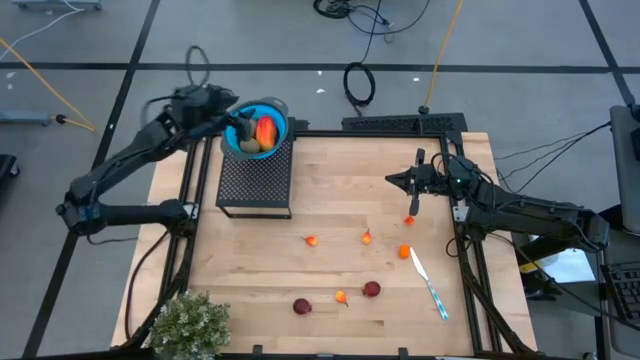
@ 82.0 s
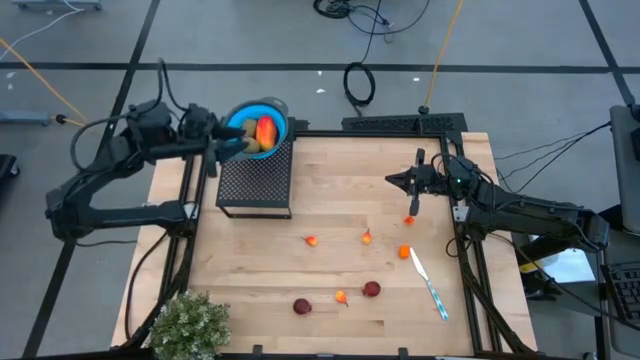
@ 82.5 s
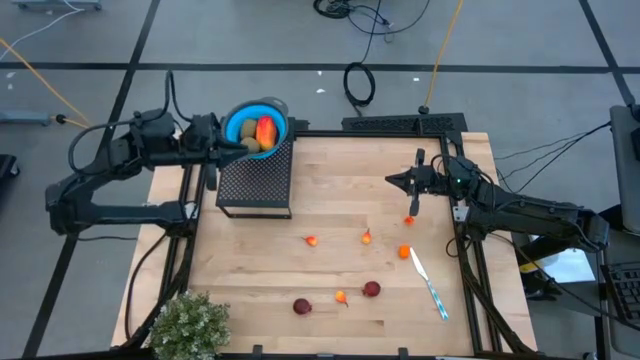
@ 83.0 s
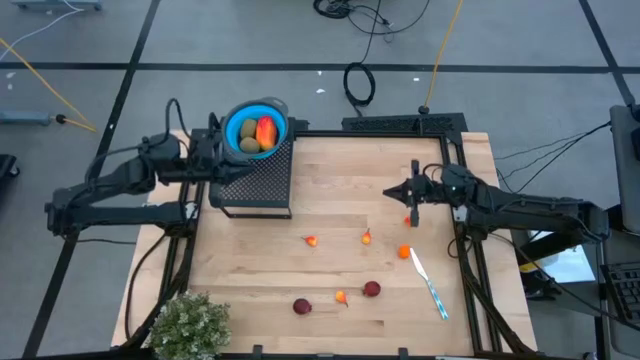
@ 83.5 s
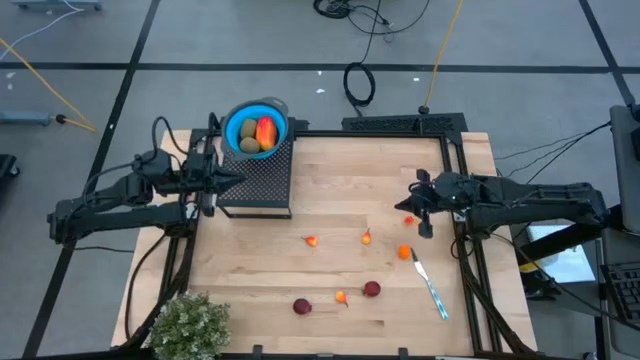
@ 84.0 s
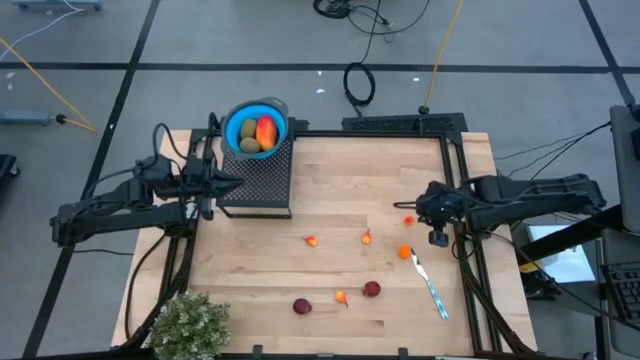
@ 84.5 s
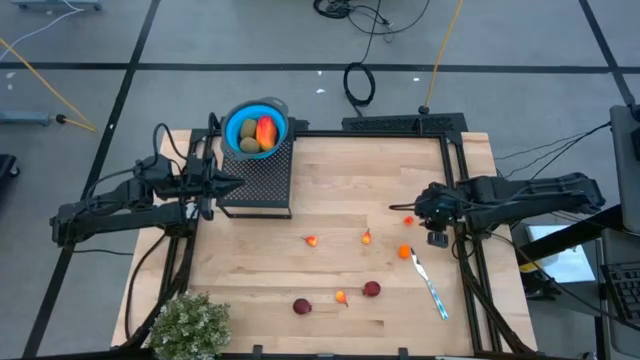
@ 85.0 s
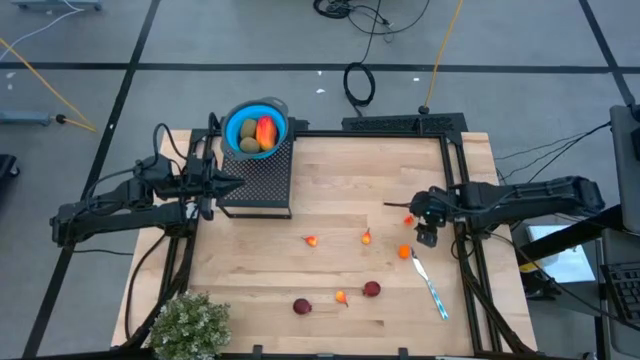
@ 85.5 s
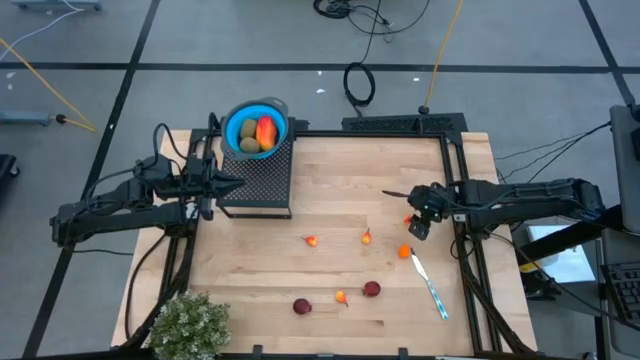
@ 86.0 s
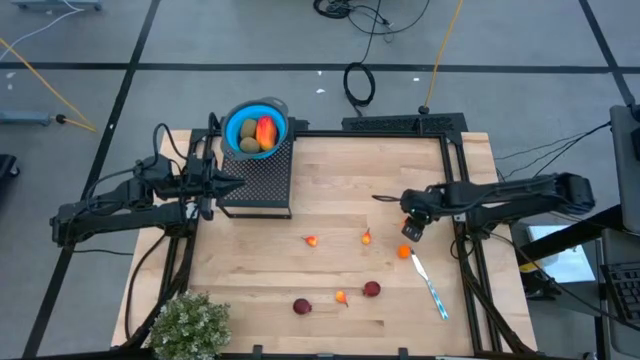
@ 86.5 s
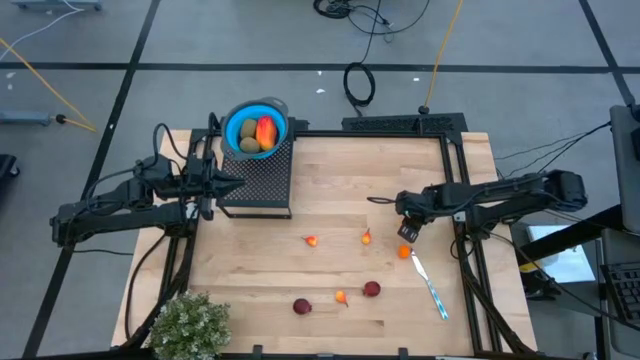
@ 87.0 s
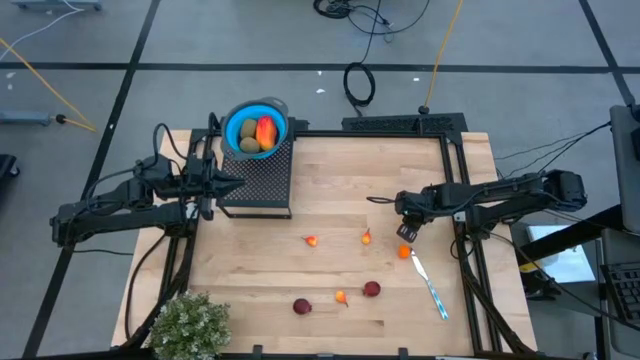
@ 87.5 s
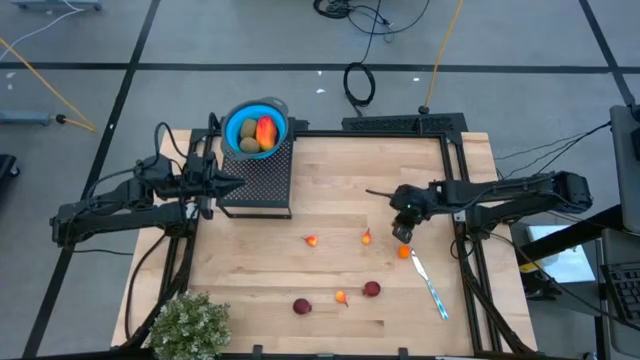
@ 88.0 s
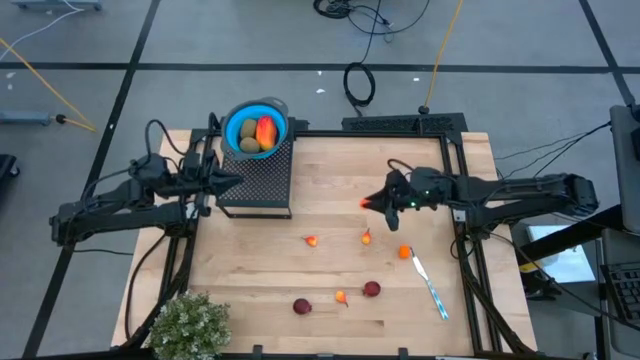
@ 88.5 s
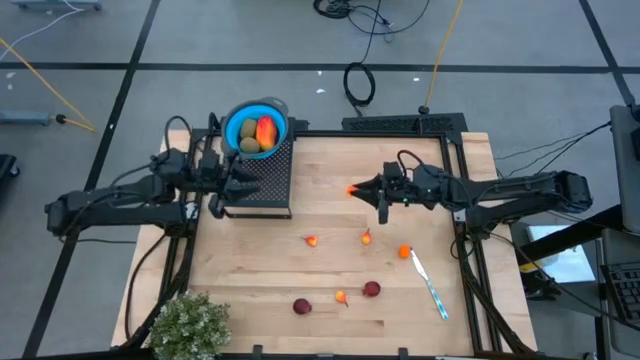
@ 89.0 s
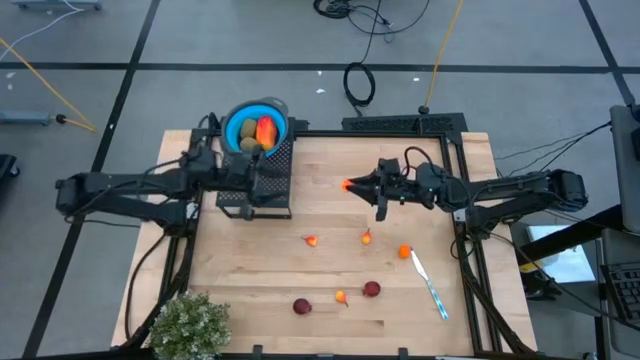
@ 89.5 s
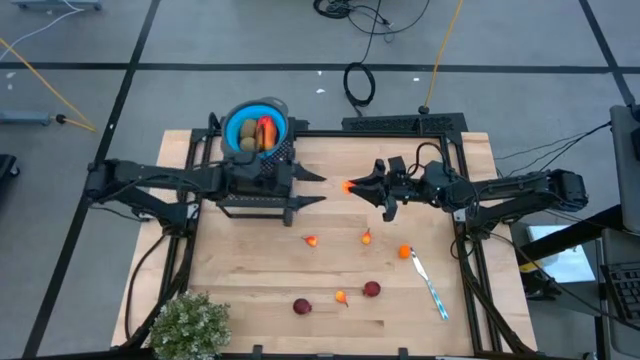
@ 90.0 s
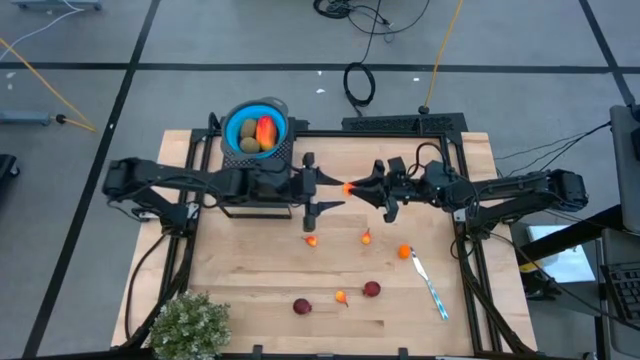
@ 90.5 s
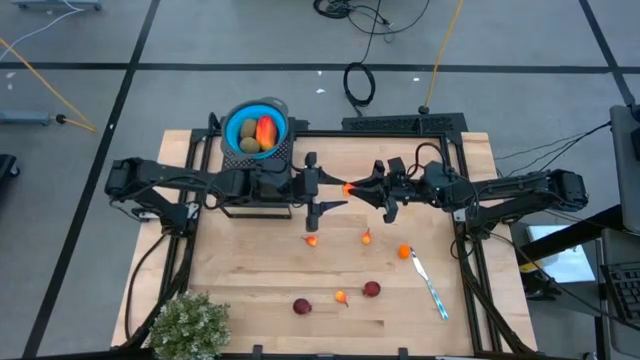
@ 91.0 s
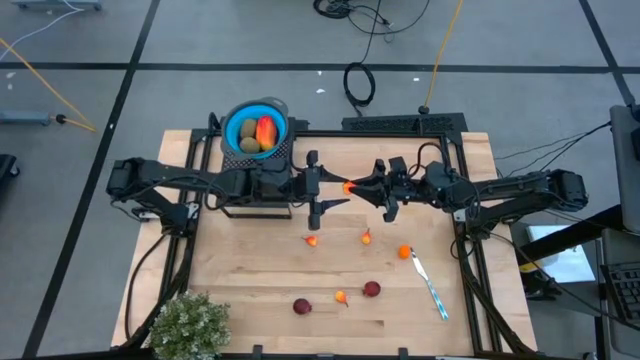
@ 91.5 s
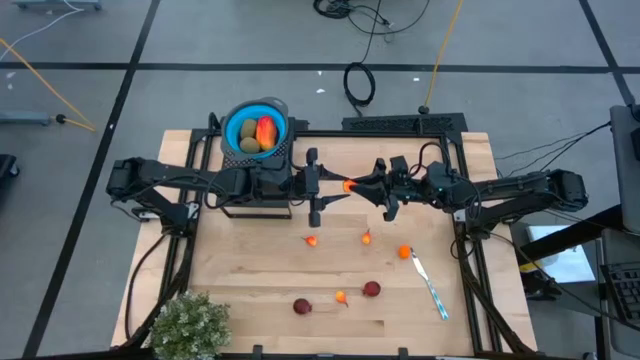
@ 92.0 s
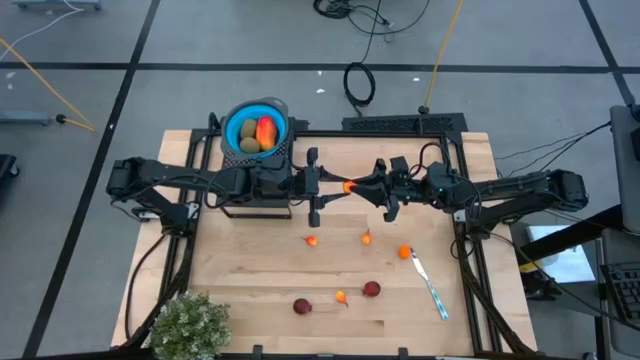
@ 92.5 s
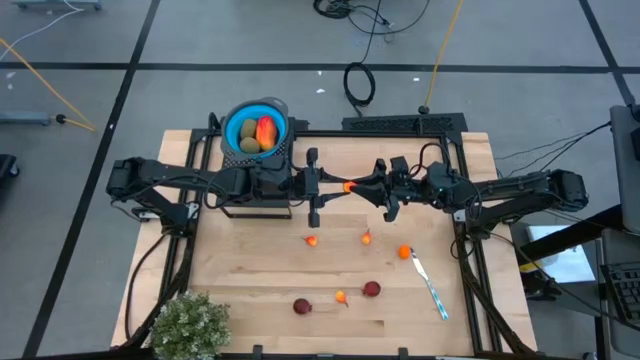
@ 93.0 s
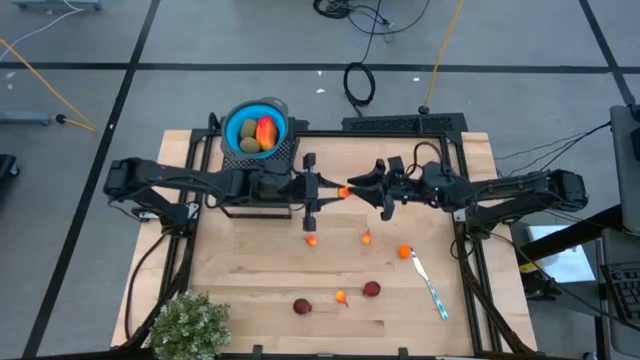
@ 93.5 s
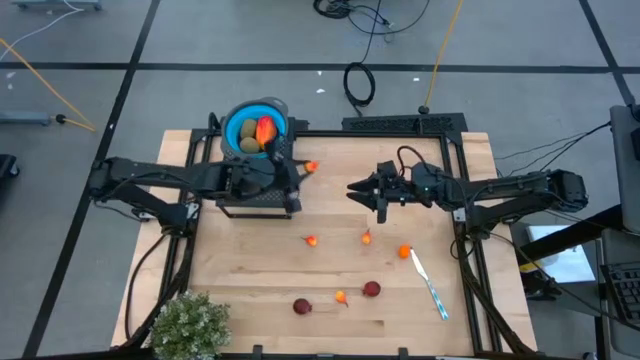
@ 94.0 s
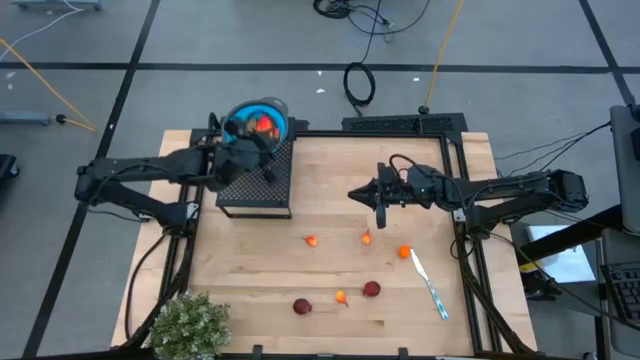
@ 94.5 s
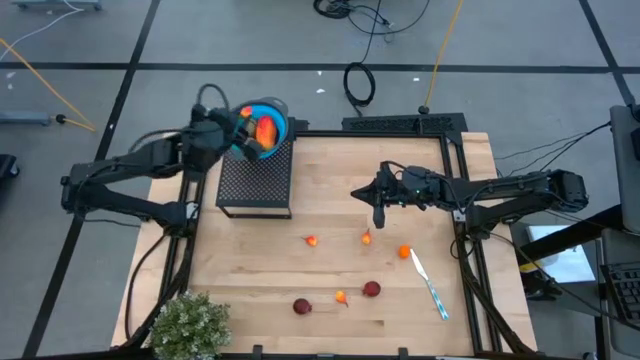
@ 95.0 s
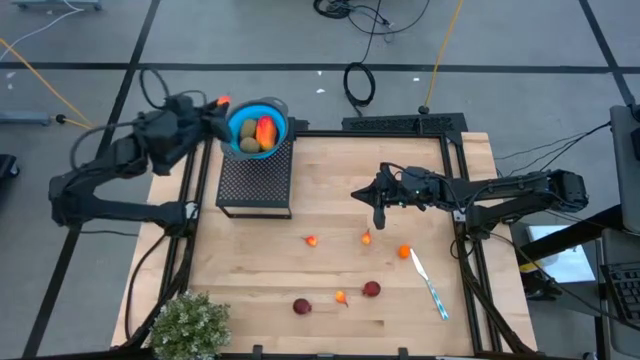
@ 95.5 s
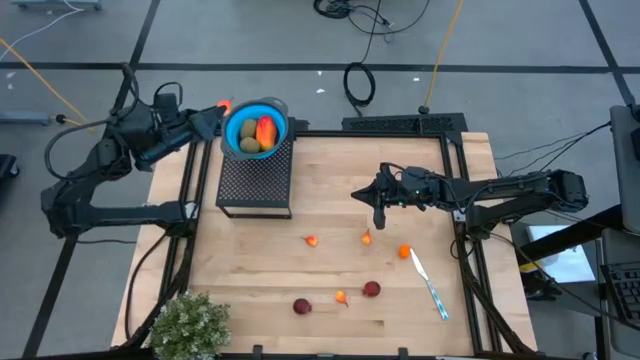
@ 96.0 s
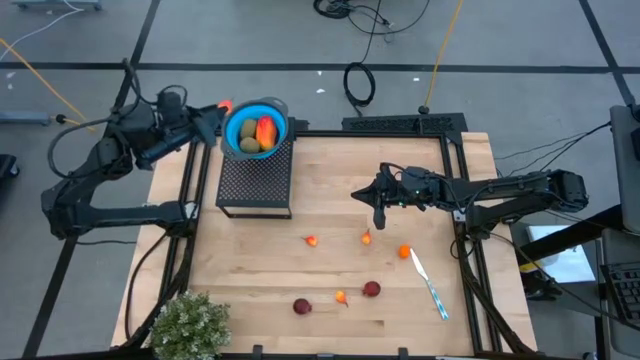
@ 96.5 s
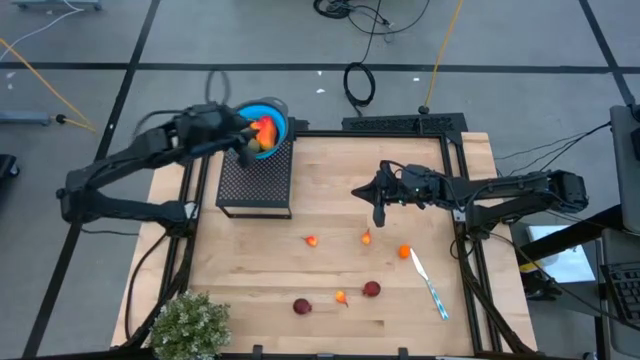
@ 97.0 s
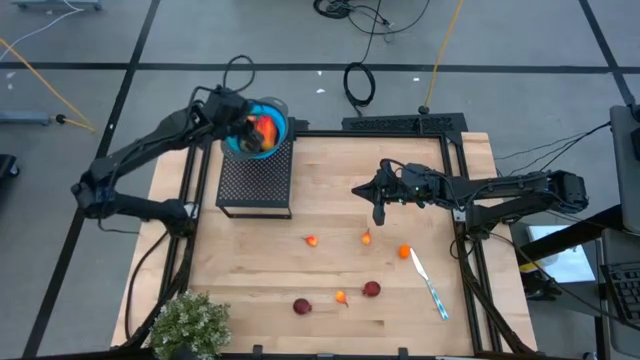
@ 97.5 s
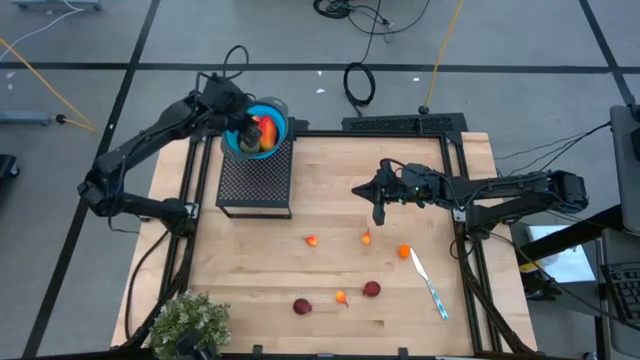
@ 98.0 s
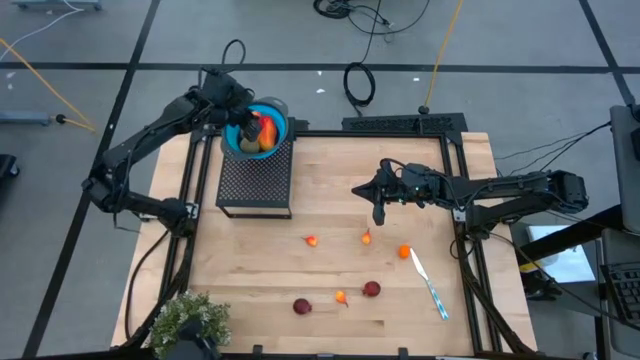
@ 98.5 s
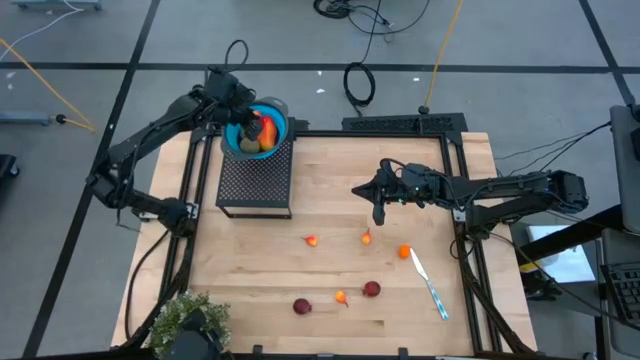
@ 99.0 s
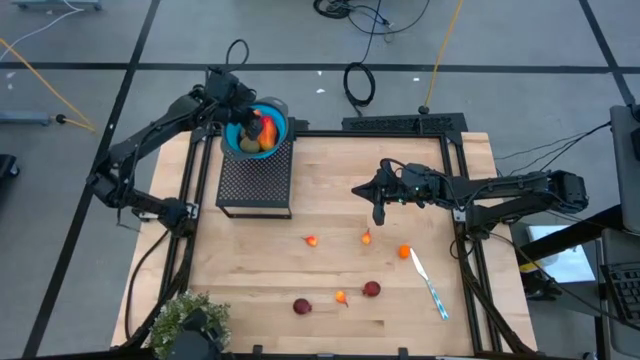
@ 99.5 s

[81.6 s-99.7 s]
Task: Pick & Place Fruit
Put the peach into the blue strainer bowl on the shelf
